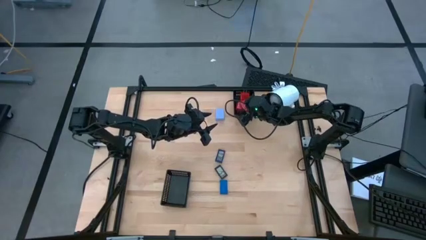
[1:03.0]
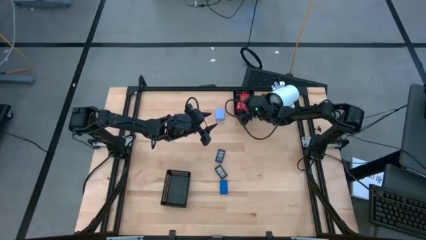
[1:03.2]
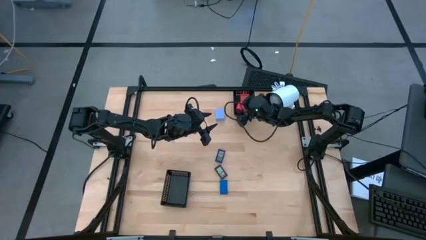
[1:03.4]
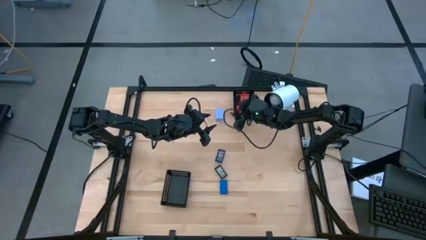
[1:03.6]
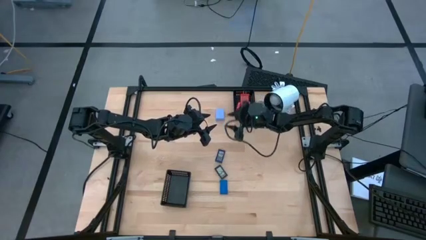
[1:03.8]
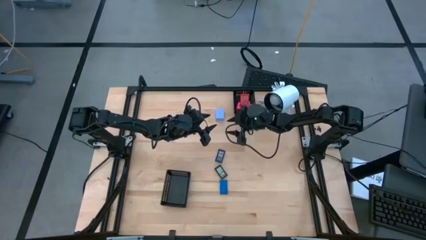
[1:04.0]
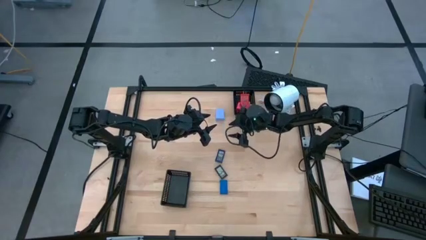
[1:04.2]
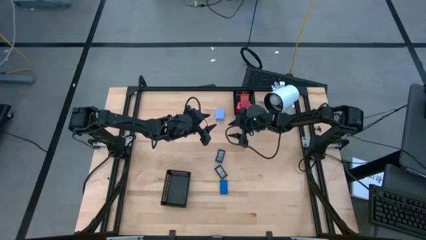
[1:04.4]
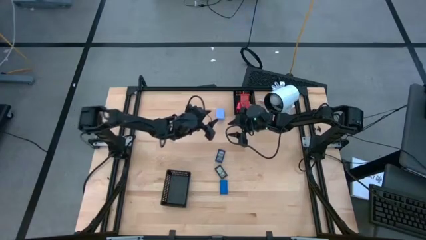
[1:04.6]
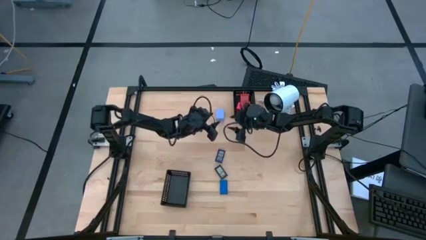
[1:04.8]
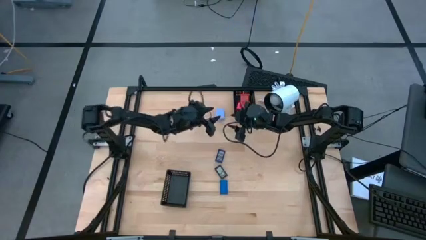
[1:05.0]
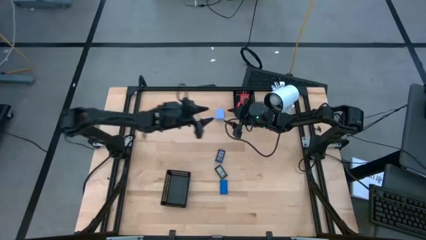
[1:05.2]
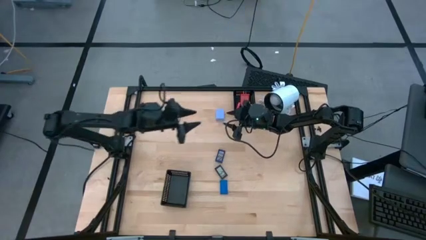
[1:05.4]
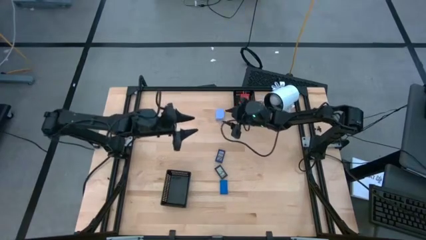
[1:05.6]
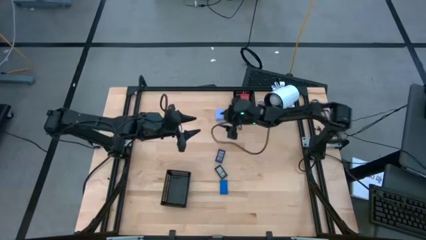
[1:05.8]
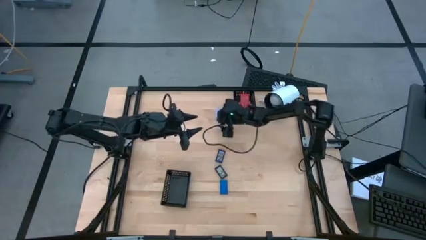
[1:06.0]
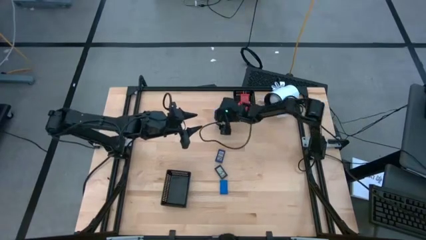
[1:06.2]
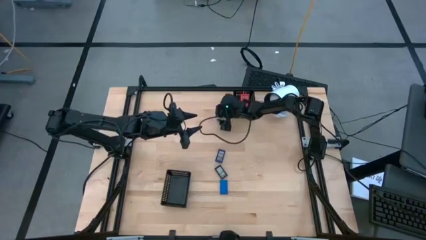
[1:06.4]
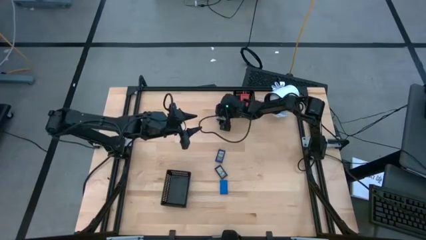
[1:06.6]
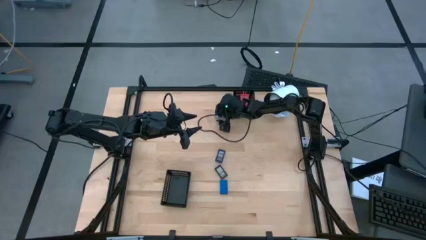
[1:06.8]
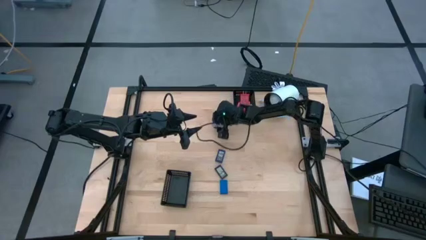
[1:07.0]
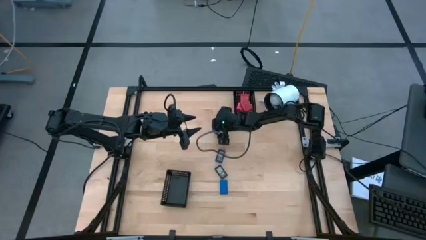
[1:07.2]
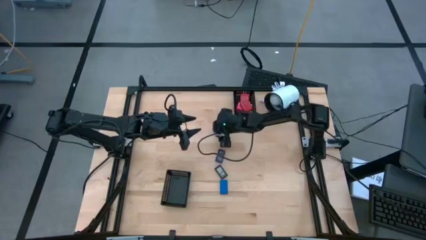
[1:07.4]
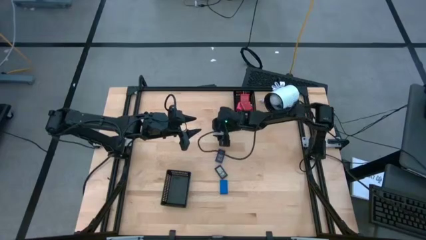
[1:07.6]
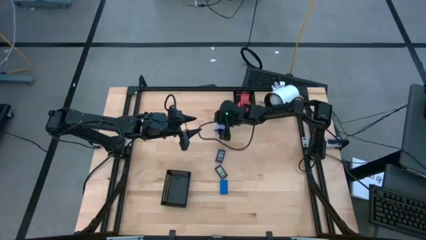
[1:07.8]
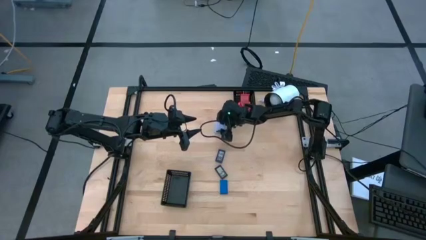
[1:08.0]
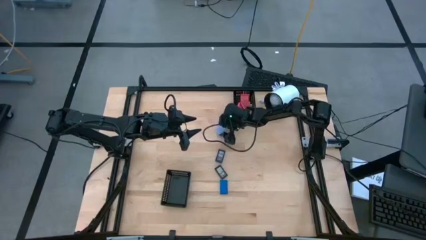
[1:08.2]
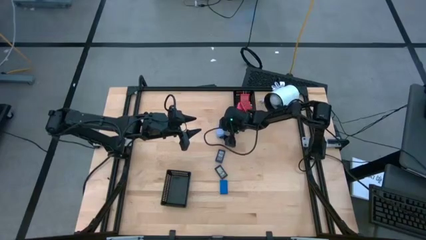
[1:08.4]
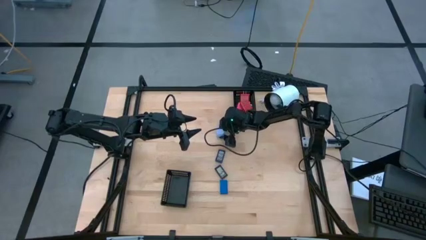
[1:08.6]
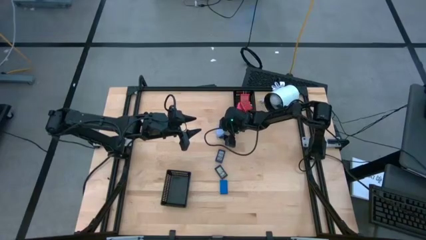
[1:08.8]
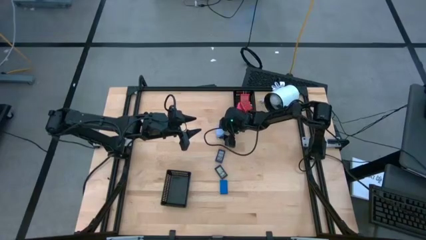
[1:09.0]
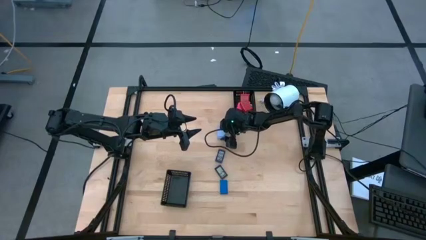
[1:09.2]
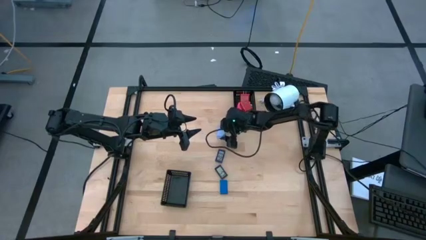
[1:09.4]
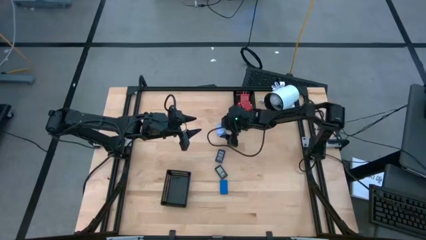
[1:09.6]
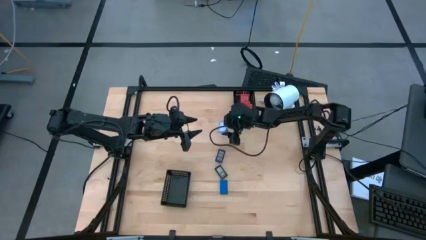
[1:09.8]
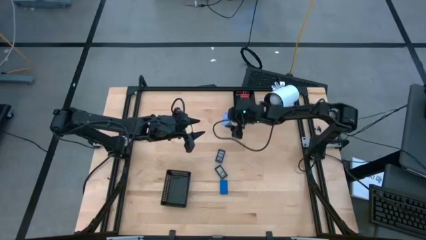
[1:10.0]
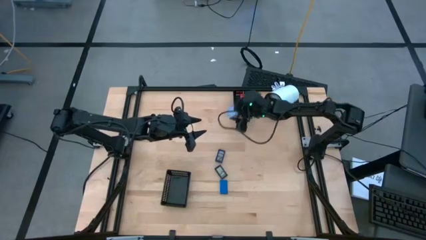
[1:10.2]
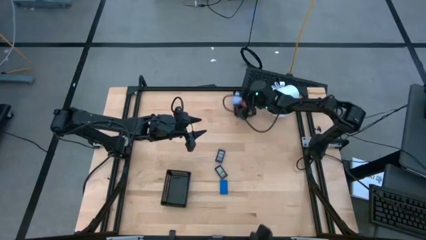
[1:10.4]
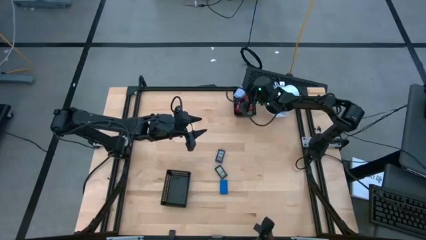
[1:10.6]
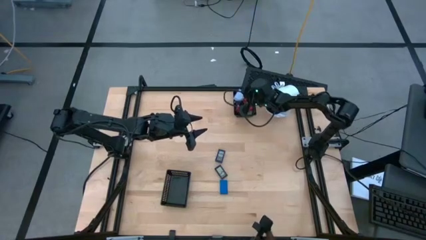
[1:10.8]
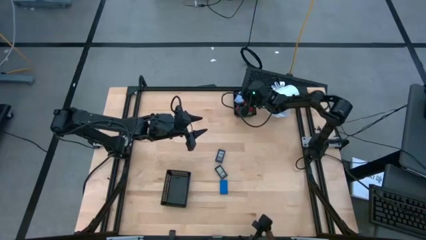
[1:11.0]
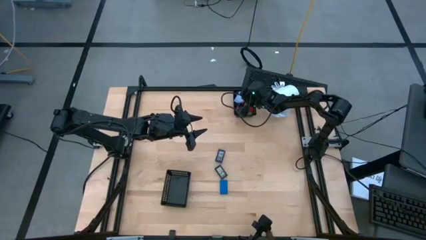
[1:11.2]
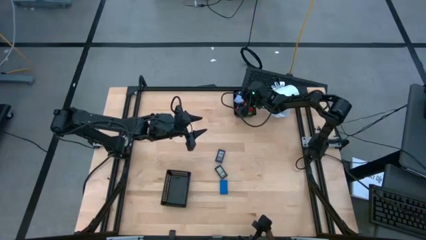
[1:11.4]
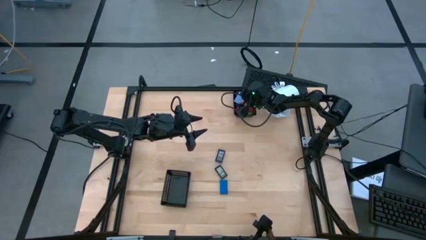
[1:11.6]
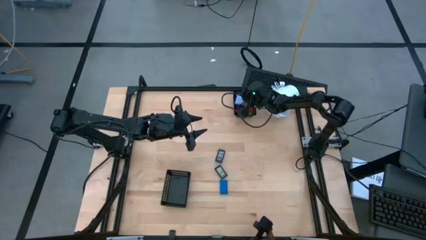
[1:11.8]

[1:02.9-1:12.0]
Task: Pick & Place Office items
Put the light purple charger adapter into the top black basket

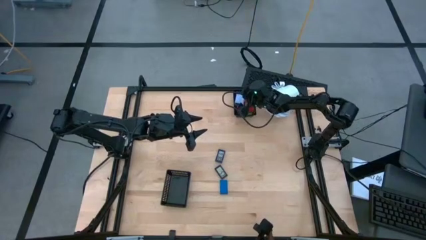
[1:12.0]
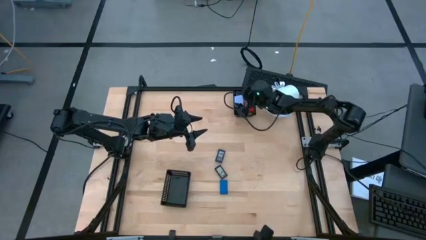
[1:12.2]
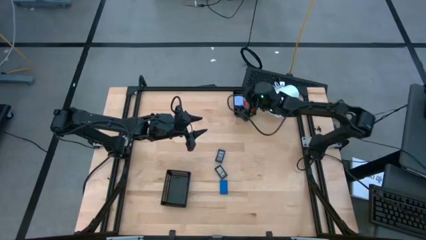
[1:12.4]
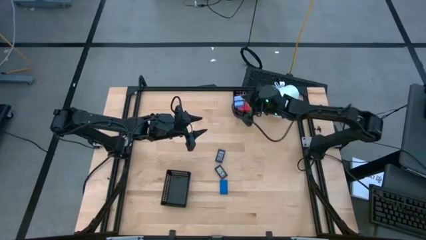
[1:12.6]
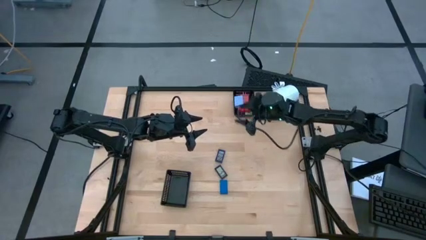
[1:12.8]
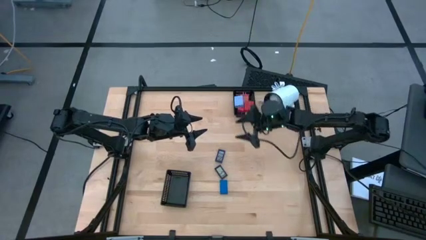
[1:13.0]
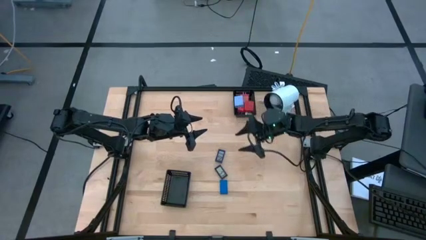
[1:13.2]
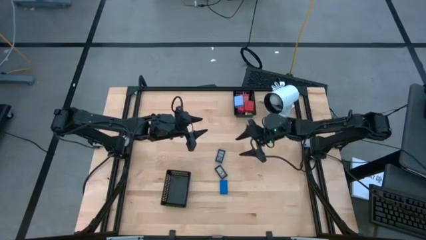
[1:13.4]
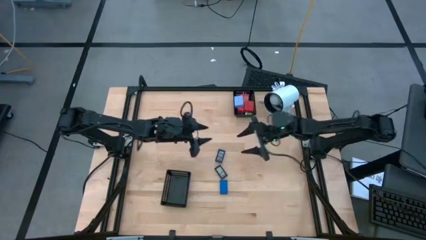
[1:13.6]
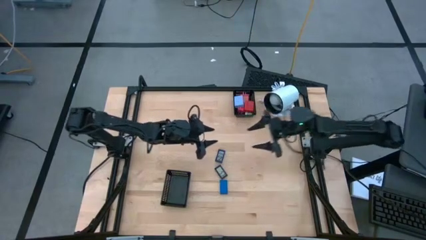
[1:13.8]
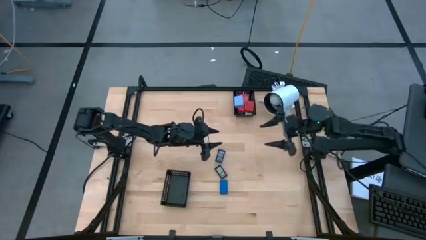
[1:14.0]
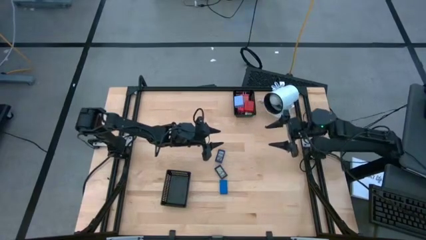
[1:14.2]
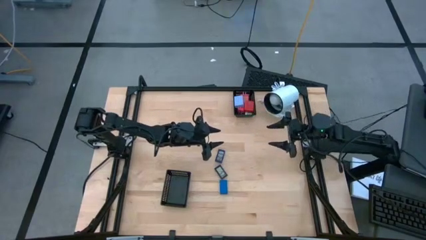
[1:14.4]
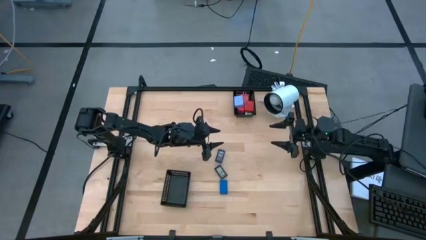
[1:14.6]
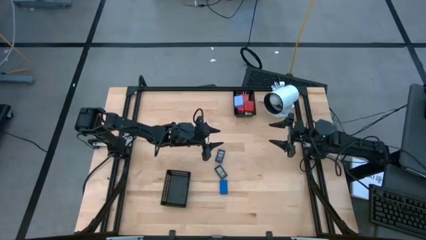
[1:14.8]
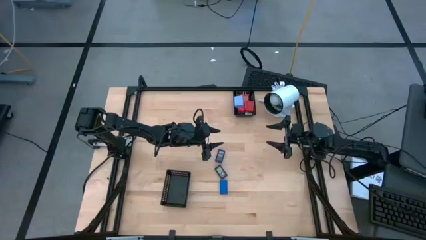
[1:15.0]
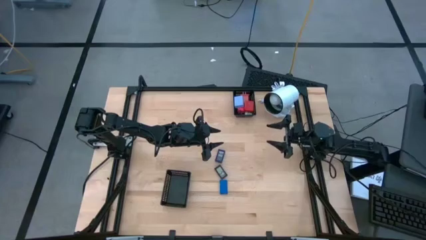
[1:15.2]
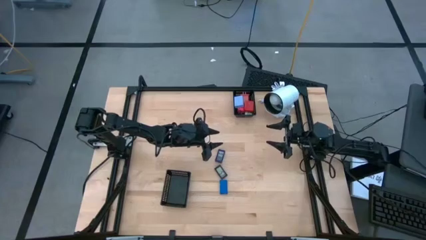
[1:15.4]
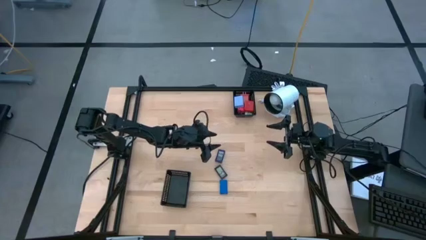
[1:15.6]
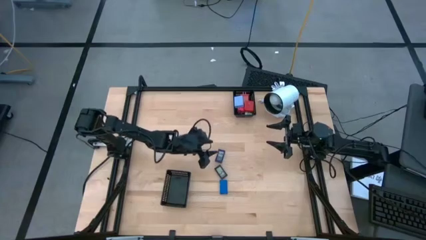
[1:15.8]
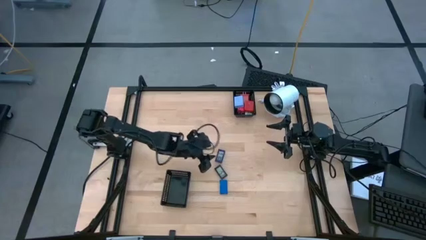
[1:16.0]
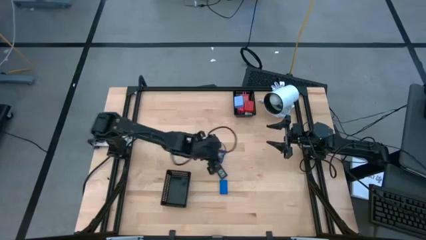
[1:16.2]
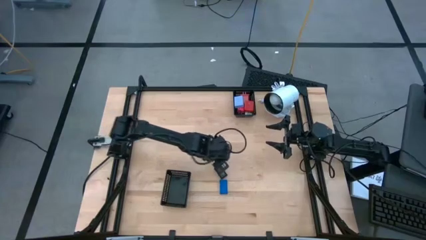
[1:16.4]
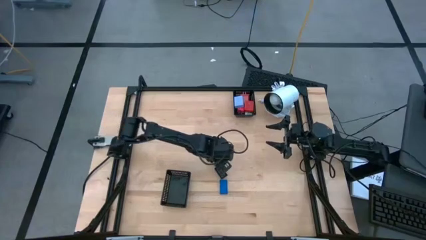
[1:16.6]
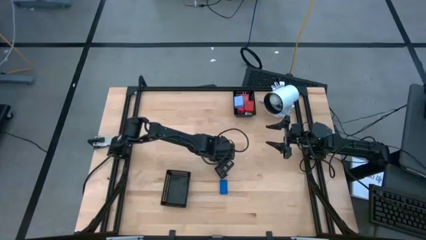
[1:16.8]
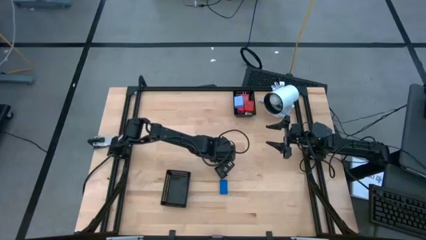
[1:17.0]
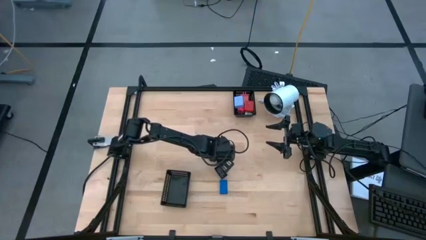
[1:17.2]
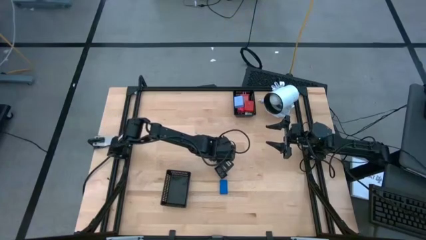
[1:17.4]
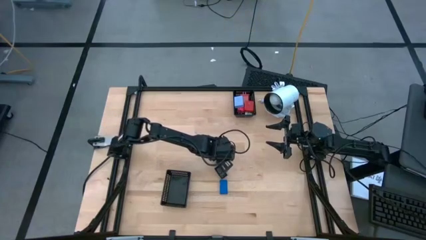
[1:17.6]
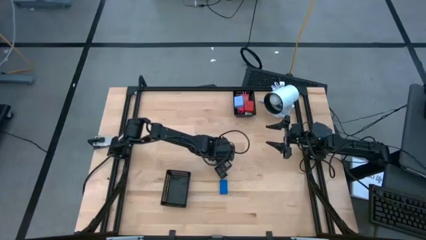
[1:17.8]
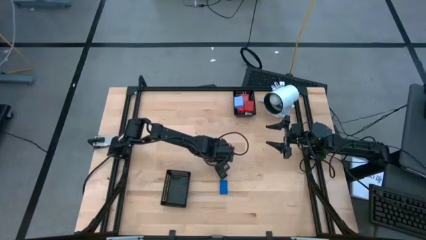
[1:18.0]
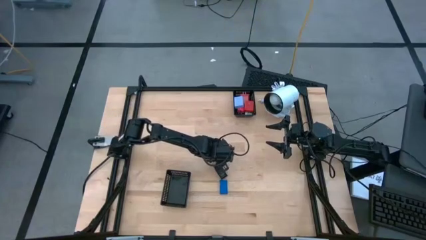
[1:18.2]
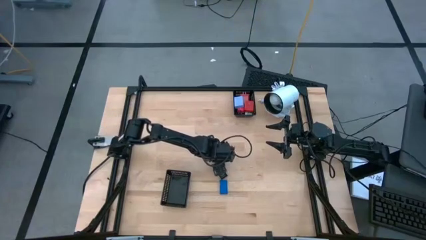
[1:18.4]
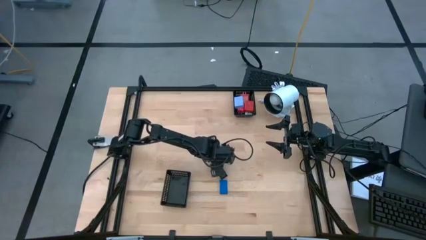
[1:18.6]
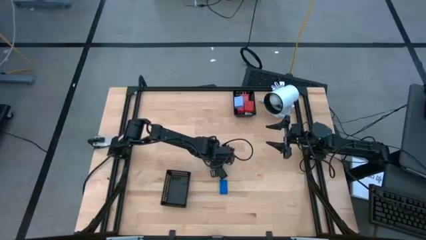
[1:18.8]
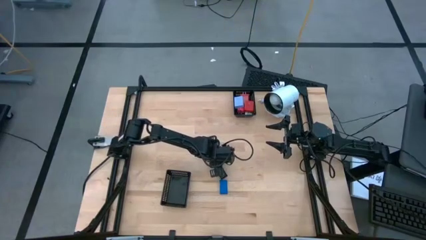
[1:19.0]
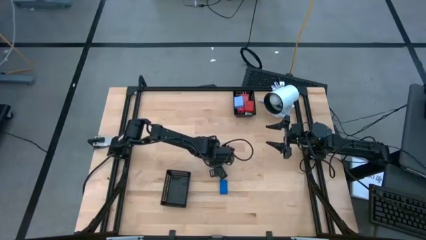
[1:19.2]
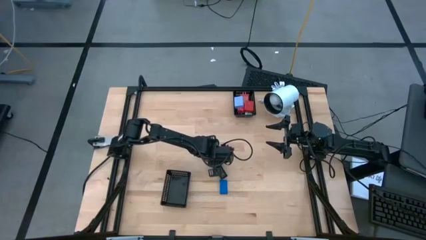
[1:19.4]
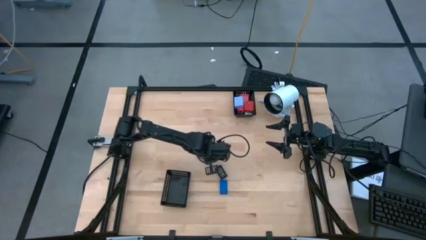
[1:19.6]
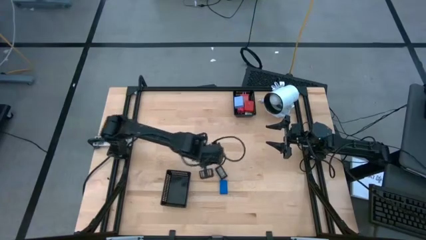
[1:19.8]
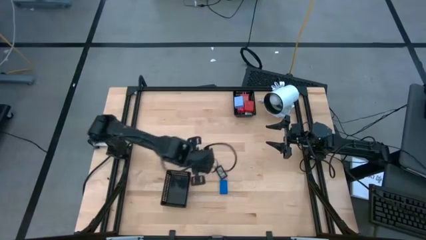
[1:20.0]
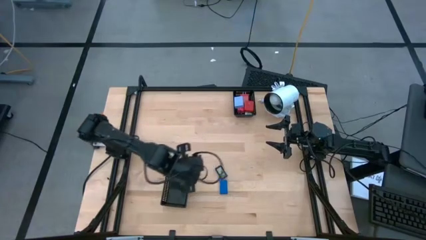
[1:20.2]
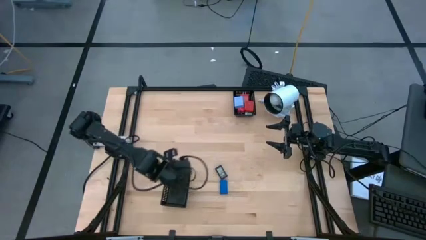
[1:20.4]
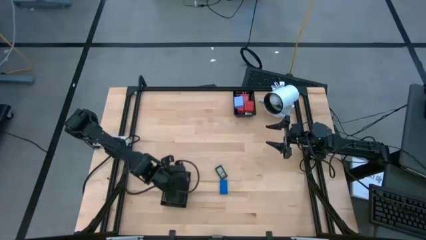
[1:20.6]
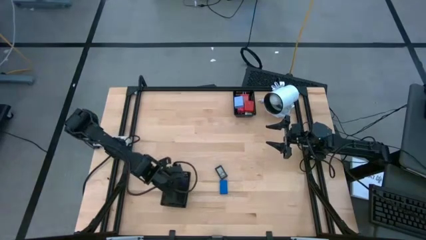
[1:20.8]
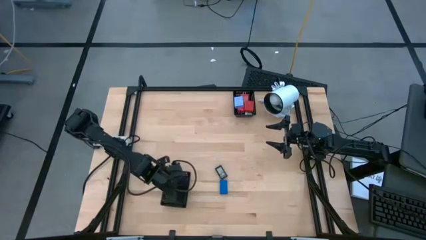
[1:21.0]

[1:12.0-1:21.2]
Put the top blue digital clock into the bottom black basket
